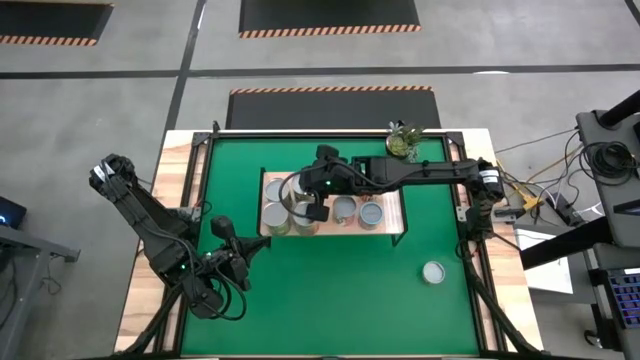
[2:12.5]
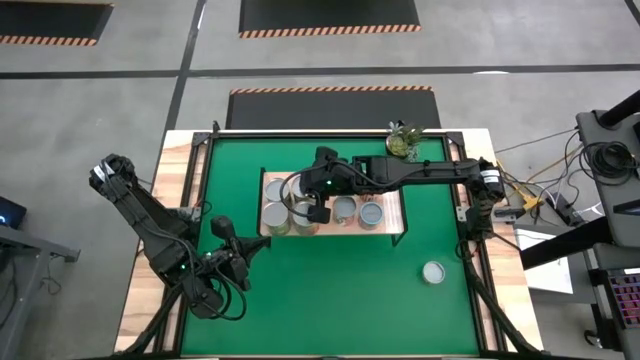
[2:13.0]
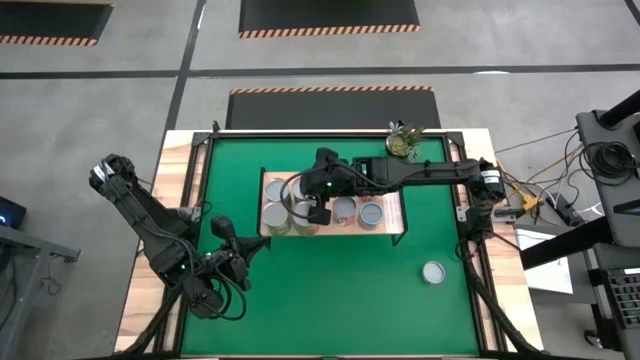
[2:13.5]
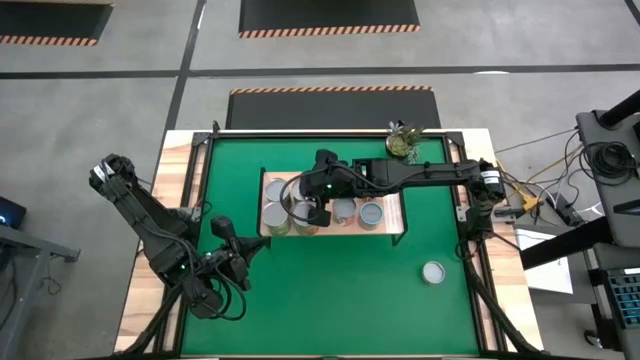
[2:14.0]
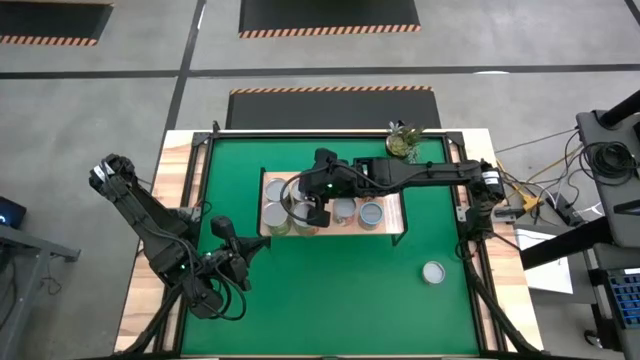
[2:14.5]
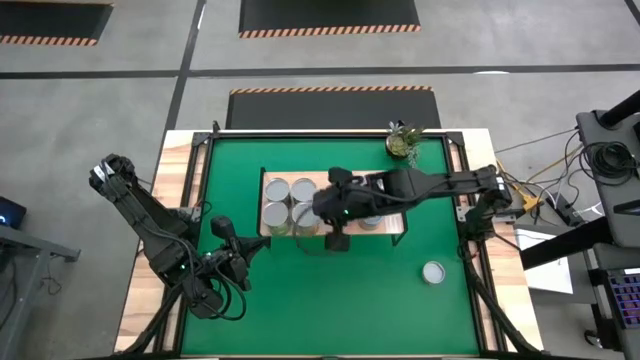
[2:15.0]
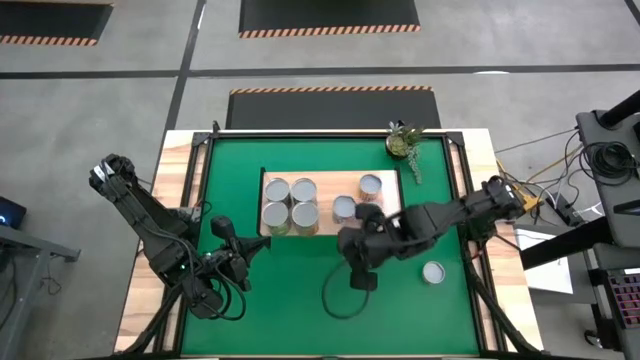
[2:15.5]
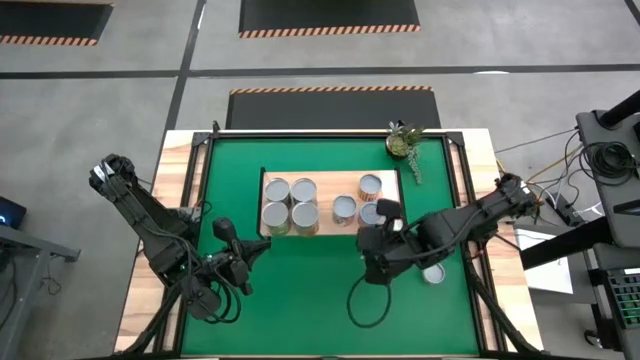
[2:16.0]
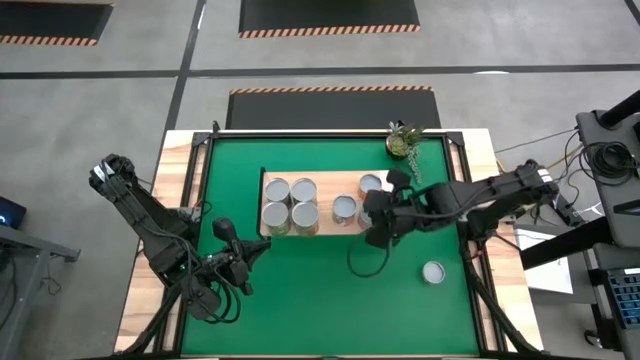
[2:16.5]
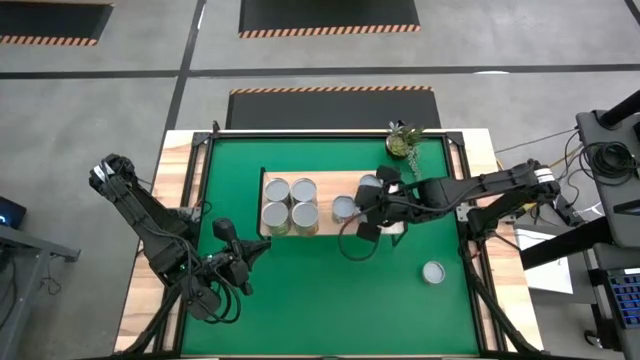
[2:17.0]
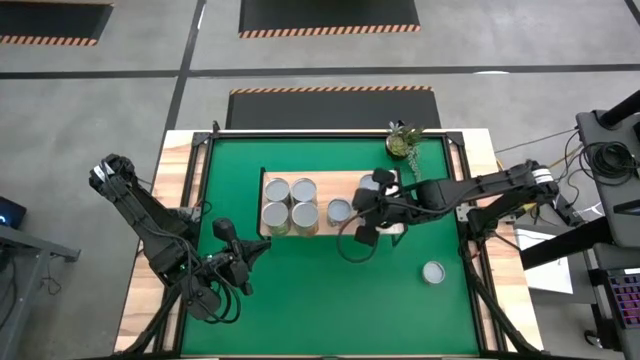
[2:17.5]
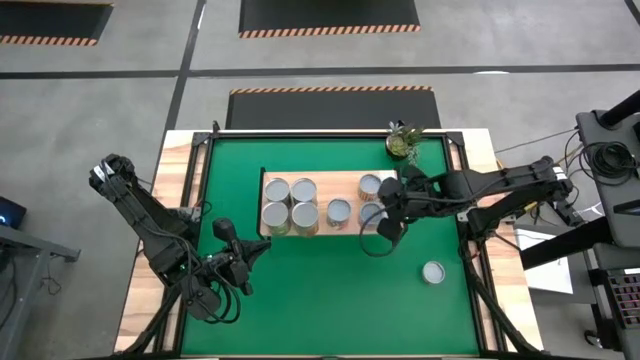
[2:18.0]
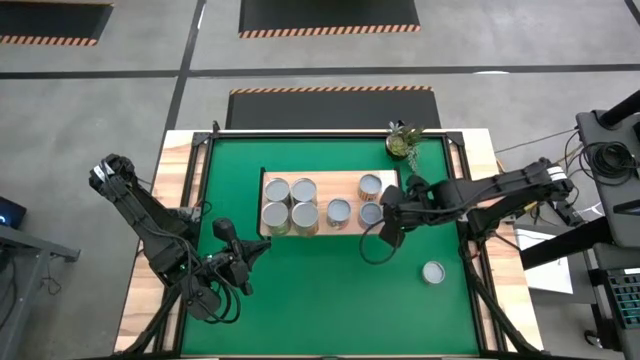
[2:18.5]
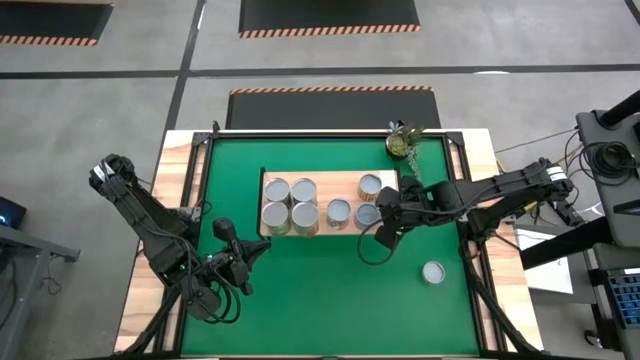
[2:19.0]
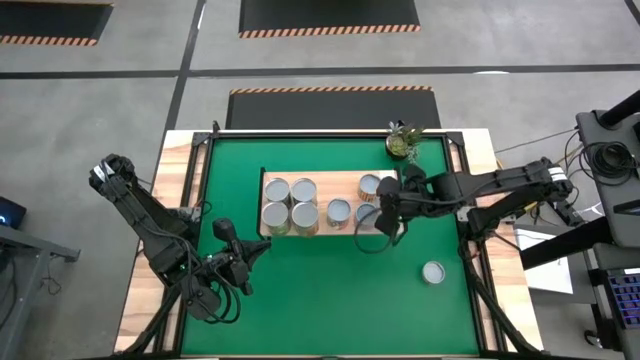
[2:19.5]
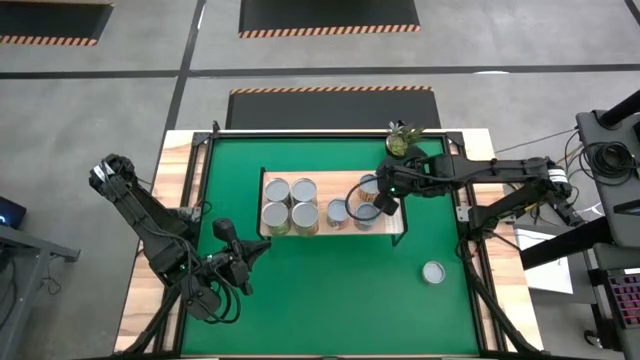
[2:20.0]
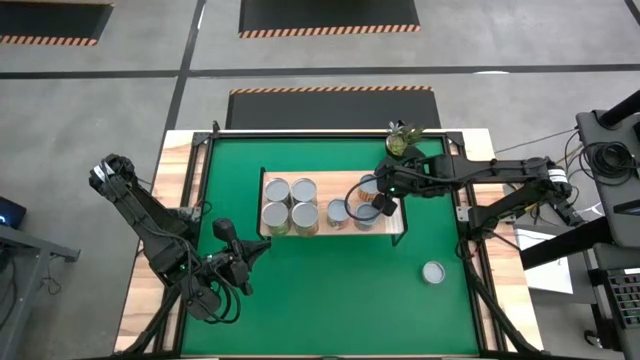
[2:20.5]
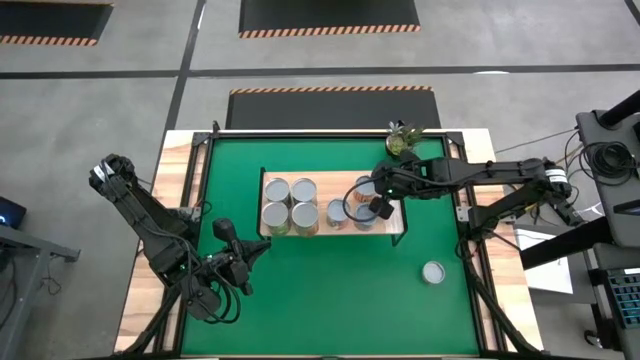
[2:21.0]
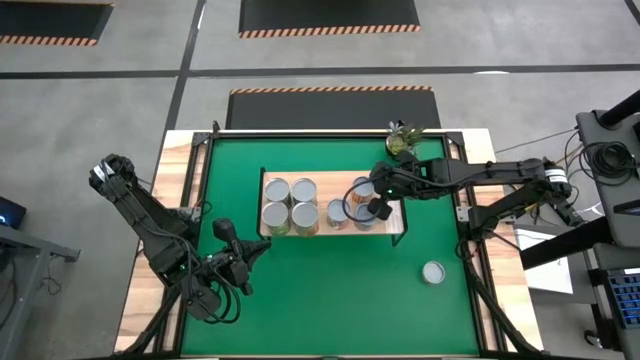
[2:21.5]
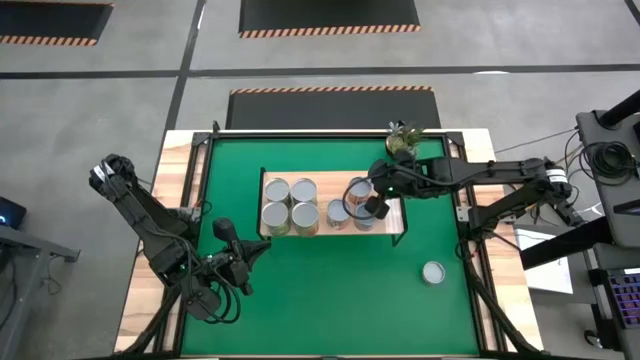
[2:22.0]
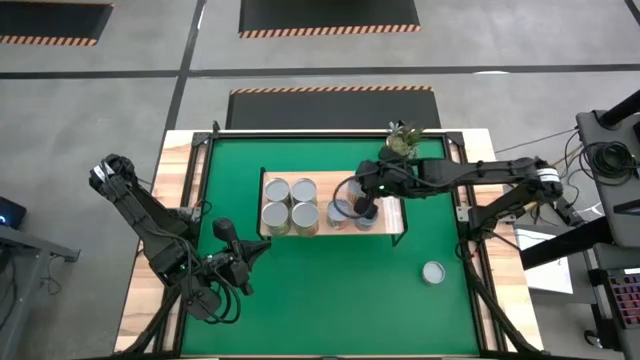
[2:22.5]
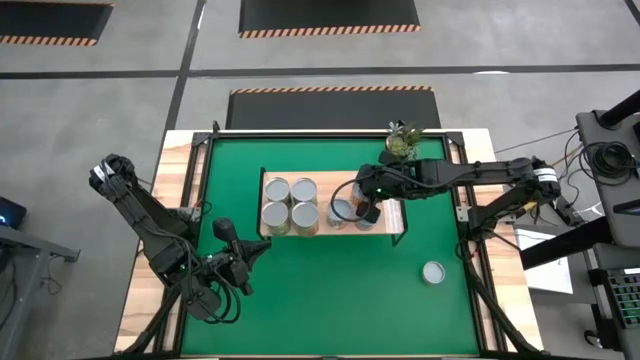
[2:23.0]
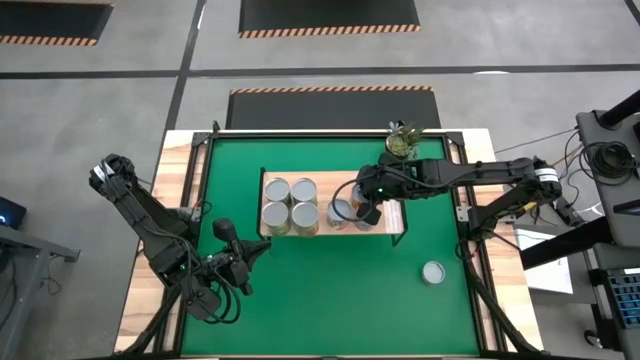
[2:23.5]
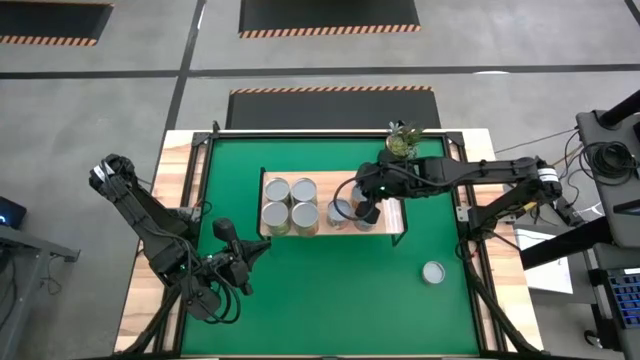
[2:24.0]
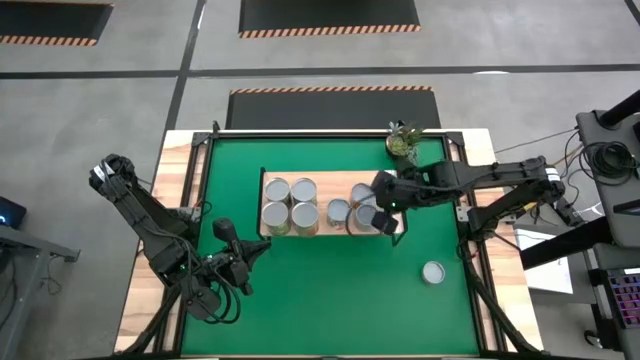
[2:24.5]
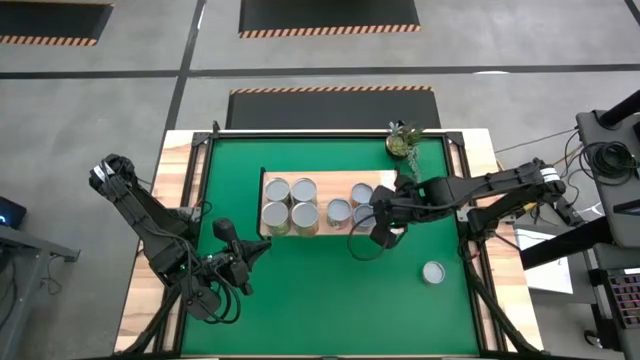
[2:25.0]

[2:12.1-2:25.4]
Task: Pick and place cans onto a shelf
Adjust the cans on the shelf

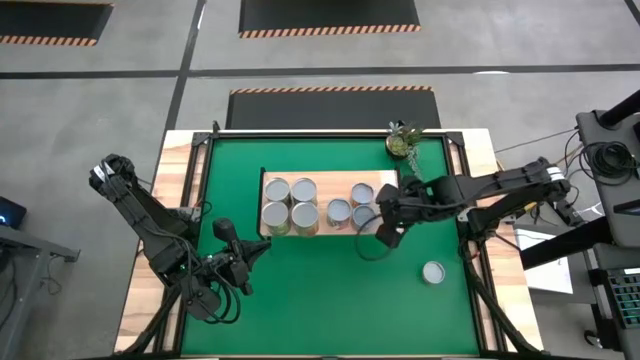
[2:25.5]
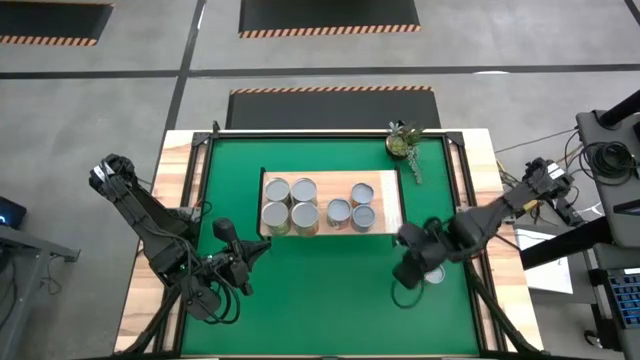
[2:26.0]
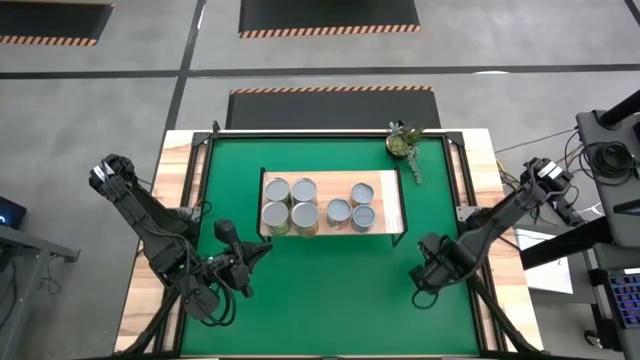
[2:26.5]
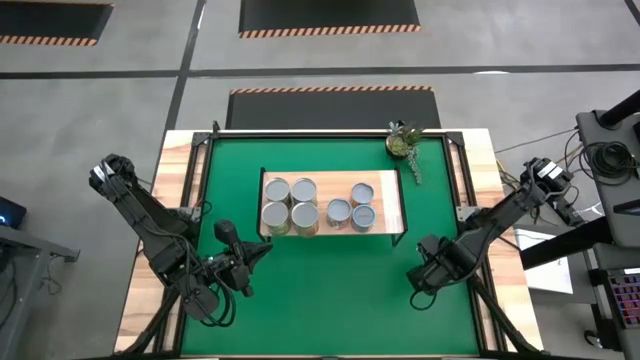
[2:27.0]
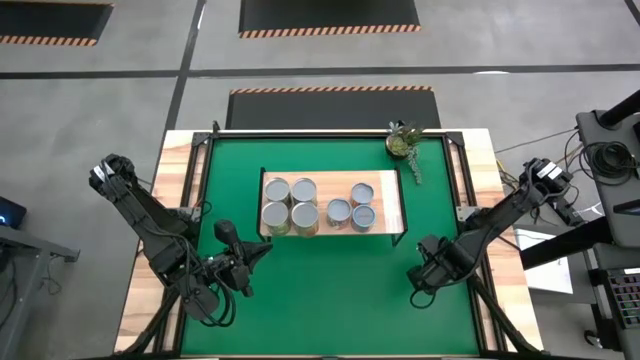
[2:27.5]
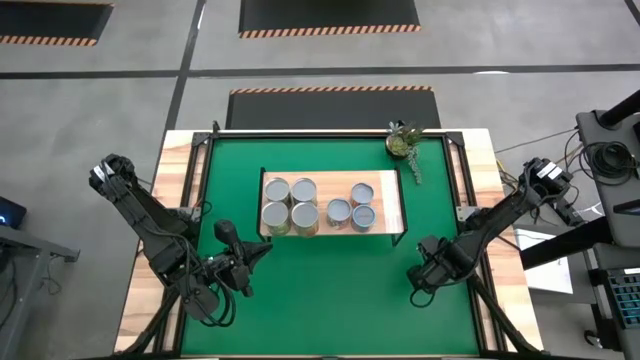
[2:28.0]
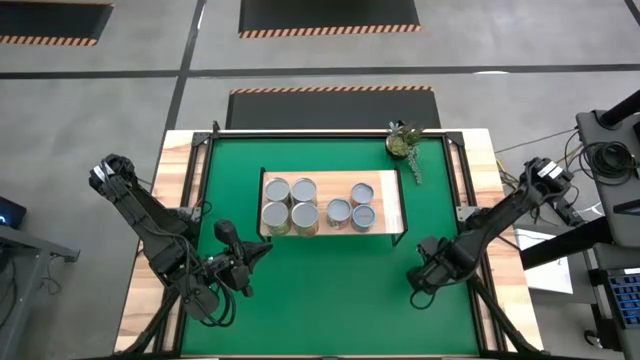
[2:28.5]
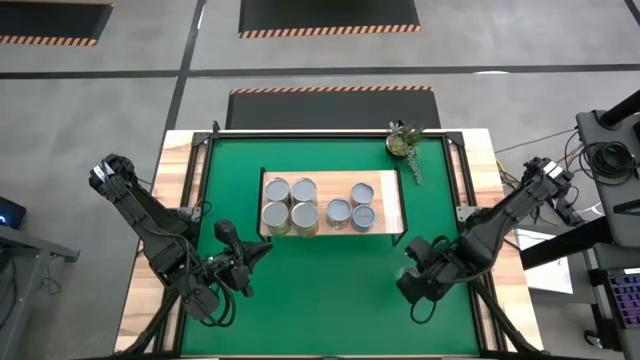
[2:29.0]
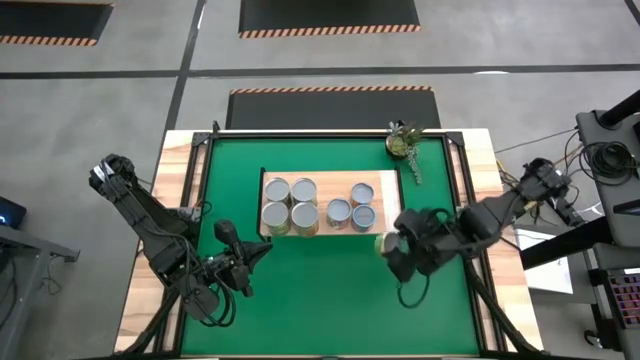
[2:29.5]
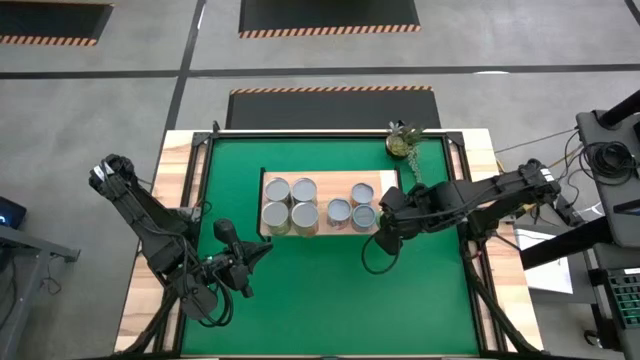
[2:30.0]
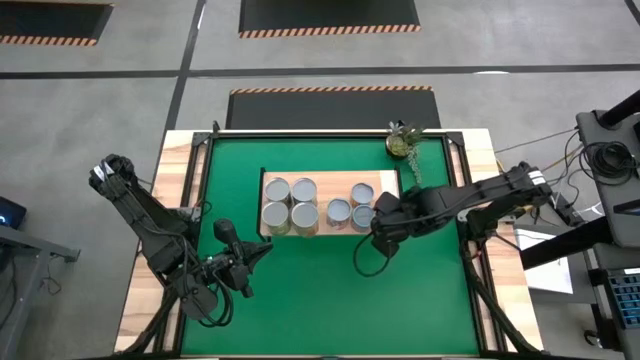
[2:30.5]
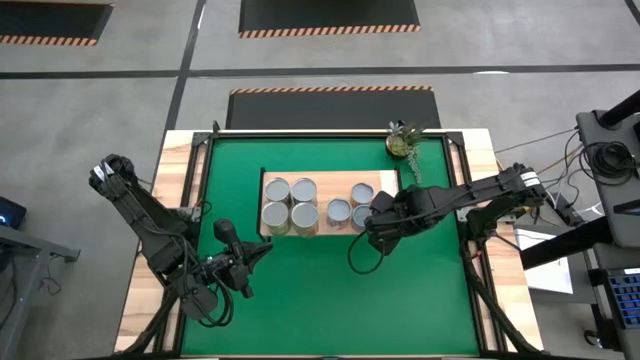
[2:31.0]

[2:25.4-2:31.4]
Put the canned mushroom on the shelf

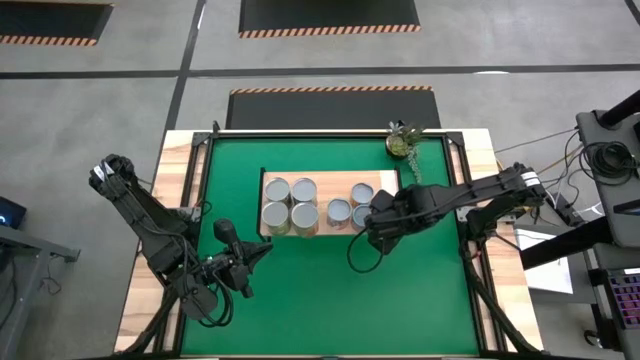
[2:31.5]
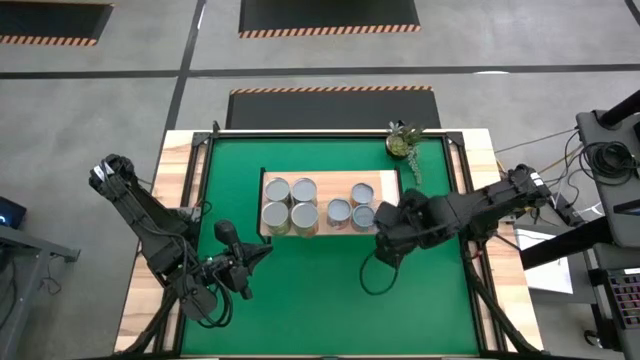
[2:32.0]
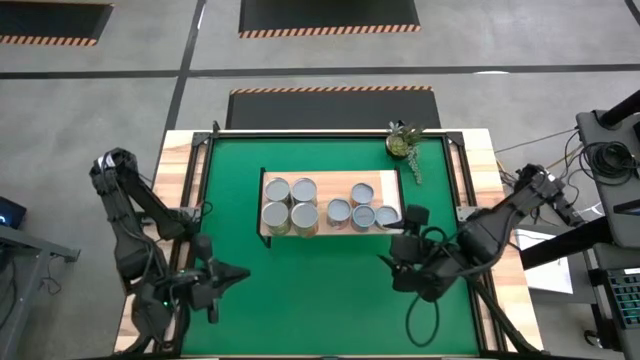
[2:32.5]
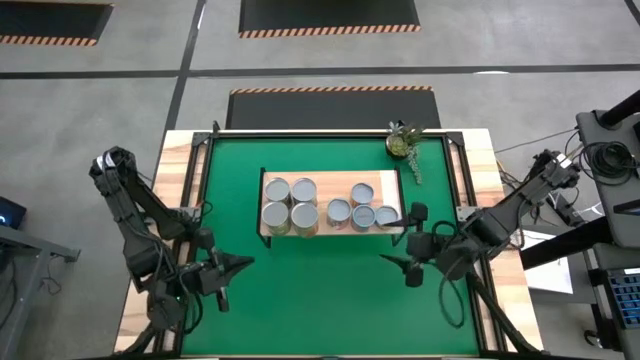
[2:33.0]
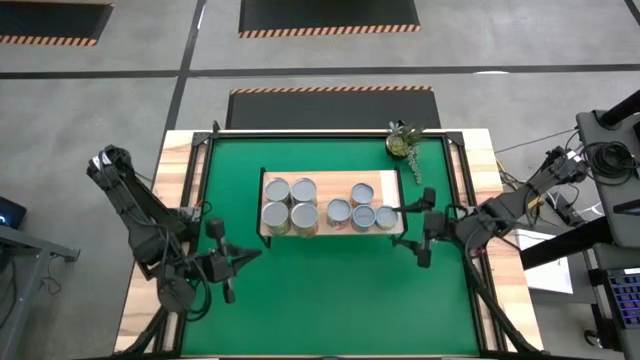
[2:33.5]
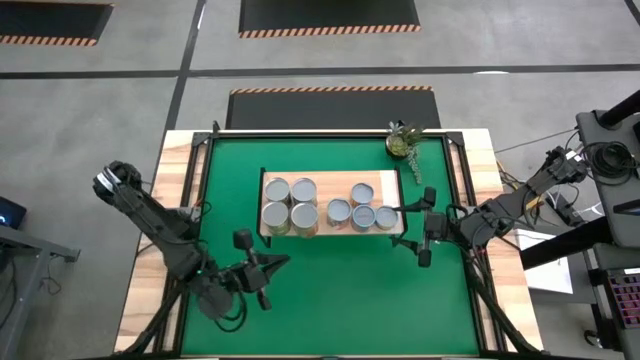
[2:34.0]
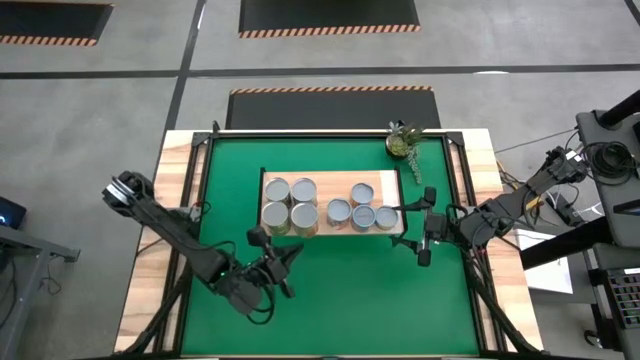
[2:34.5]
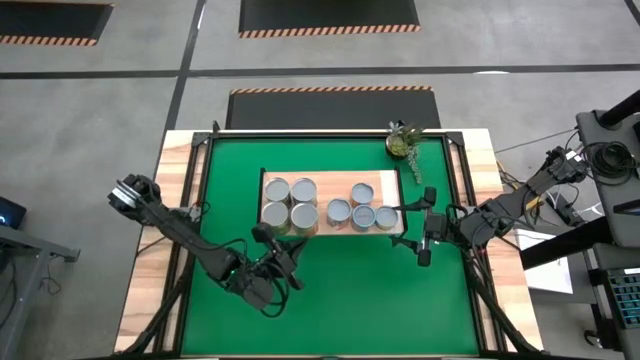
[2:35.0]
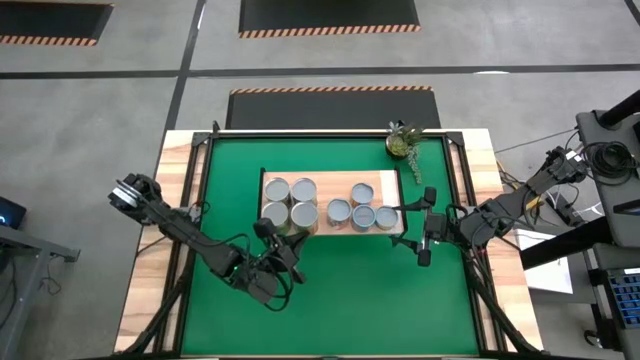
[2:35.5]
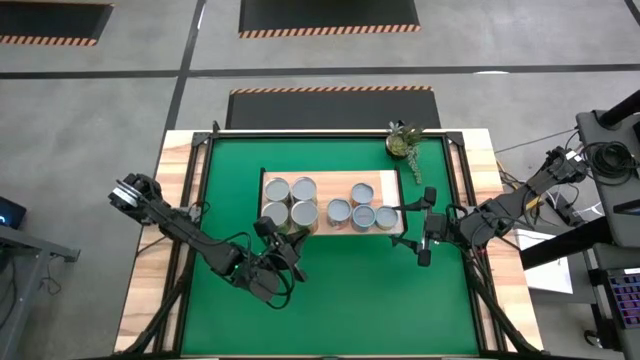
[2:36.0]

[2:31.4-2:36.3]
Adjust the canned pineapple on the shelf
